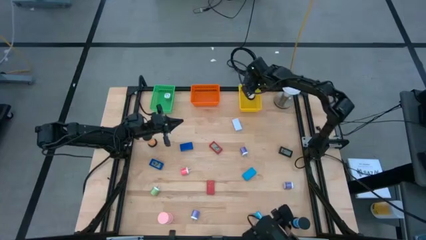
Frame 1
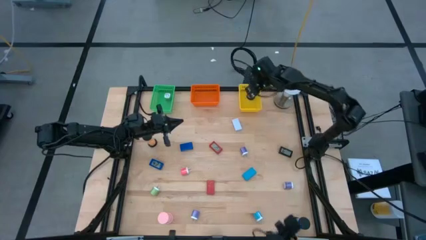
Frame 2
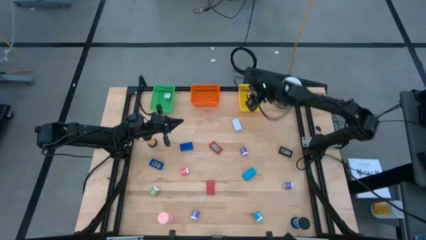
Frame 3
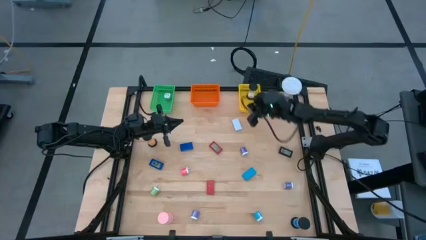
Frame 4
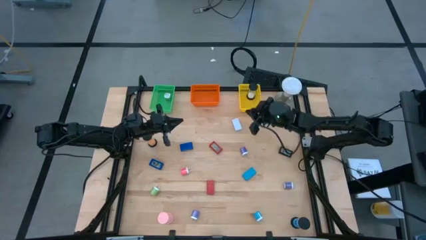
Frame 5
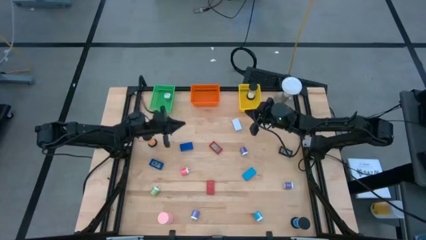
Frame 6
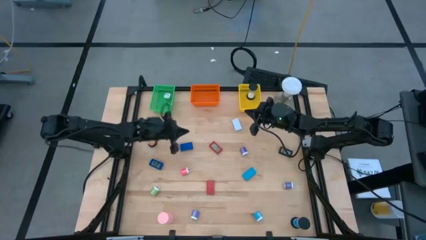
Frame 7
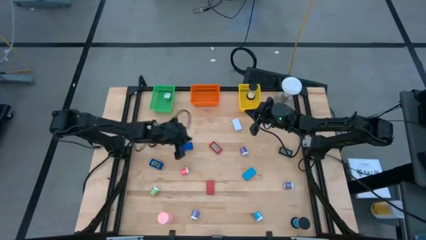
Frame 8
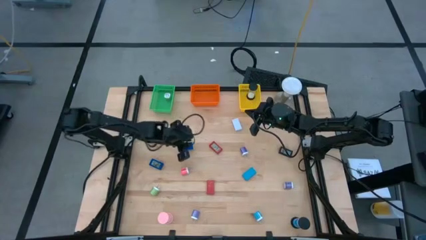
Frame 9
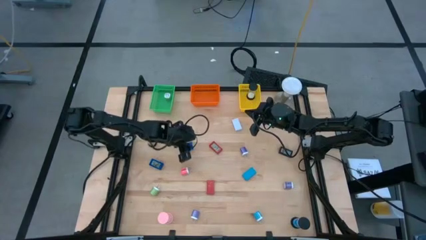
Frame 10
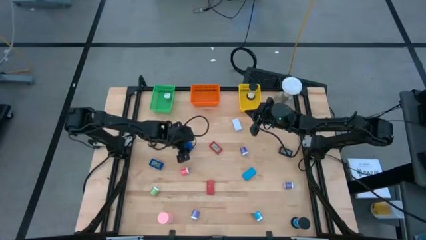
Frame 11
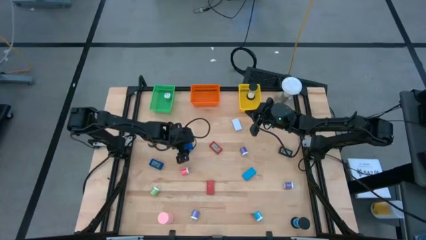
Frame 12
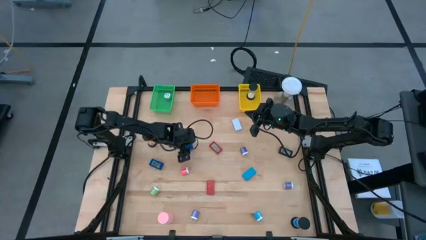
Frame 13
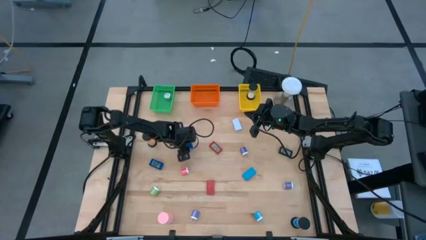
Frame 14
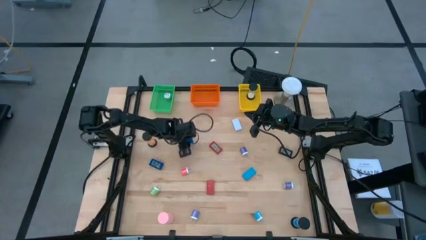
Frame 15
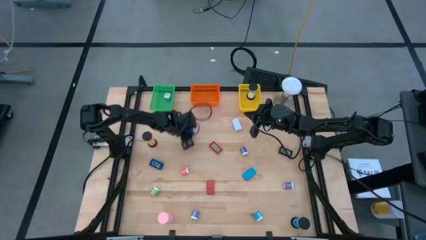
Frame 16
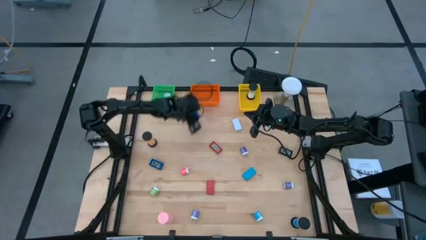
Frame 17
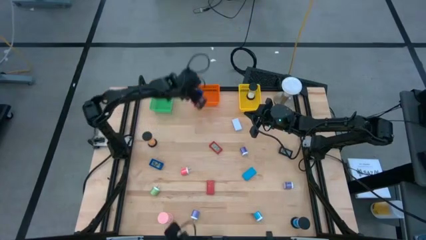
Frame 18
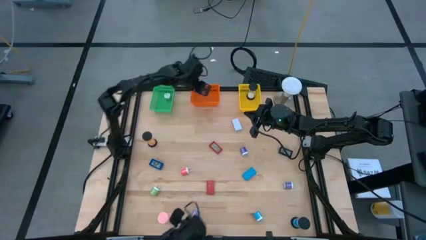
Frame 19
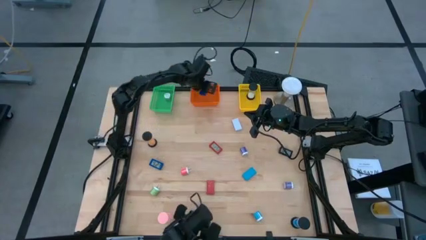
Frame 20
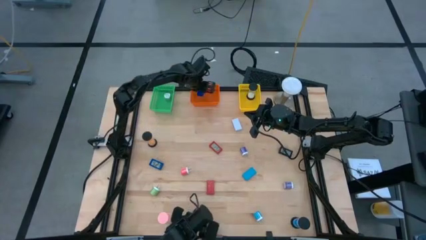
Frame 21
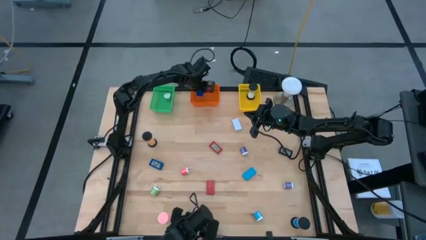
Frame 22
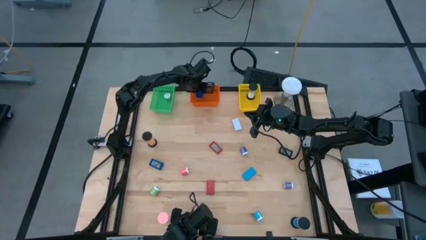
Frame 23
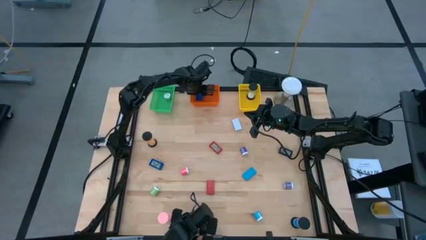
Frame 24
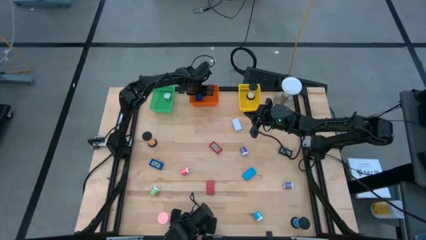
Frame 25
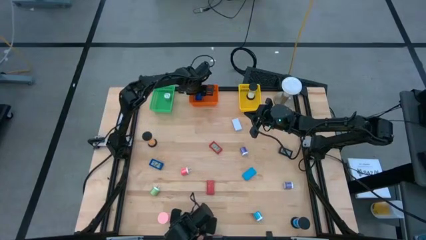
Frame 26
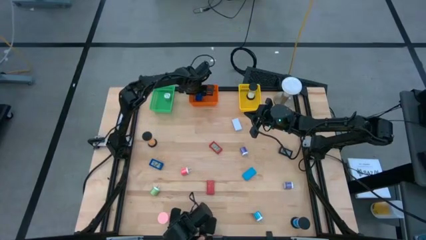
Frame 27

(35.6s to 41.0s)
Task: Pick & Place Office items
Put the right blue digital clock into the orange bin

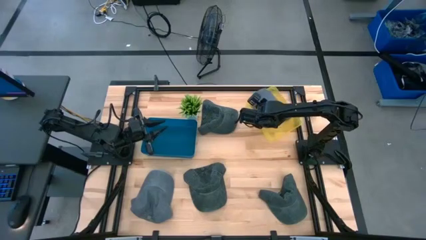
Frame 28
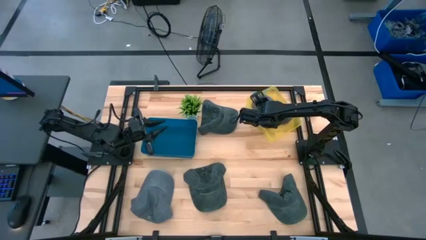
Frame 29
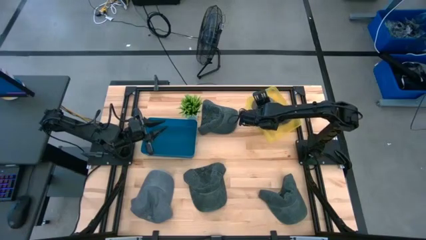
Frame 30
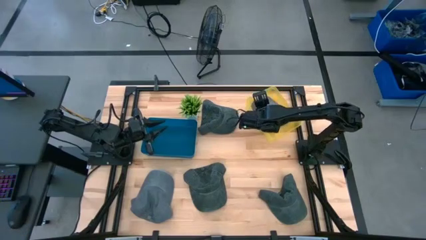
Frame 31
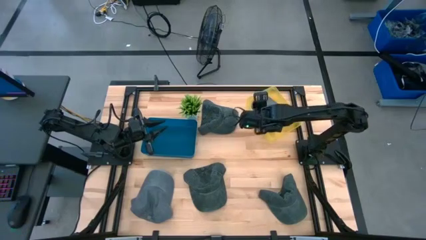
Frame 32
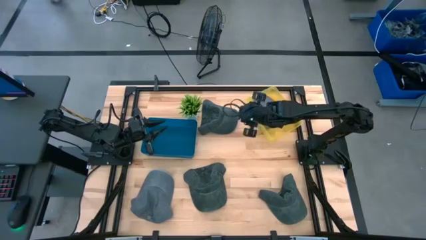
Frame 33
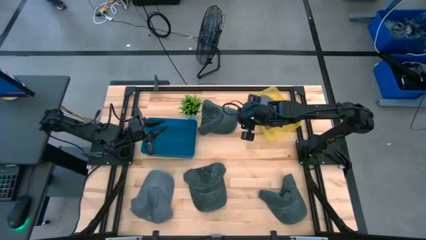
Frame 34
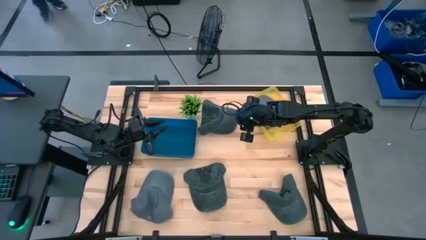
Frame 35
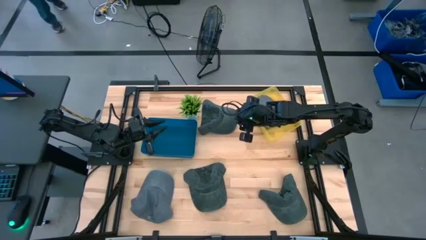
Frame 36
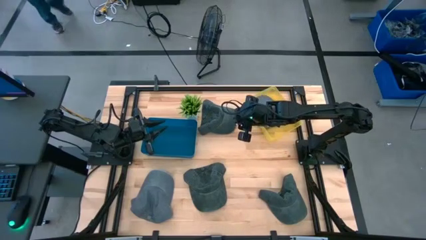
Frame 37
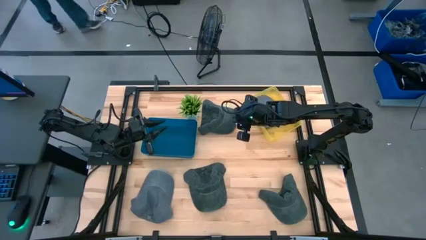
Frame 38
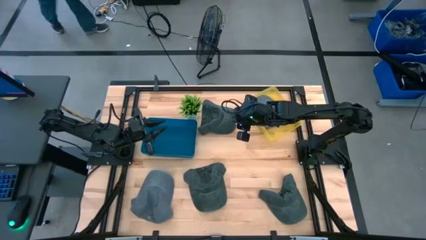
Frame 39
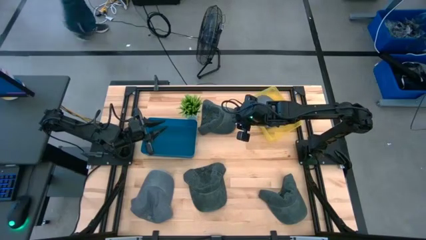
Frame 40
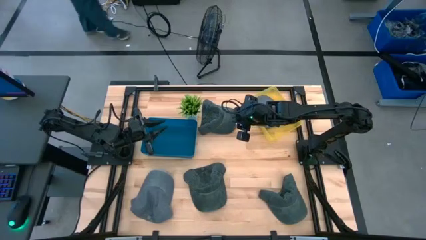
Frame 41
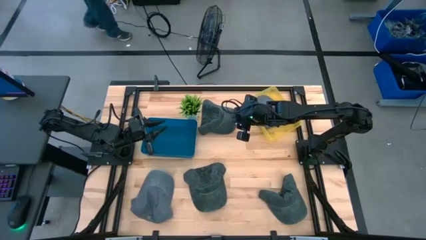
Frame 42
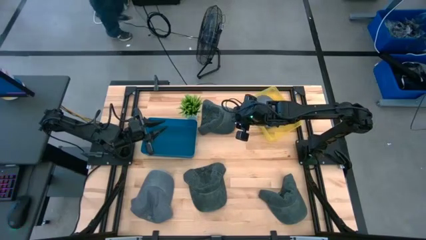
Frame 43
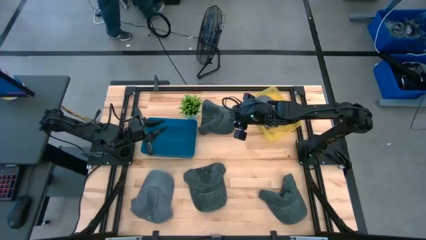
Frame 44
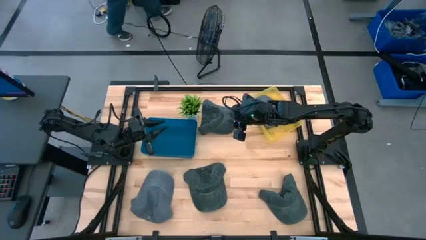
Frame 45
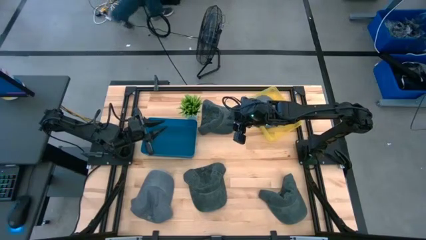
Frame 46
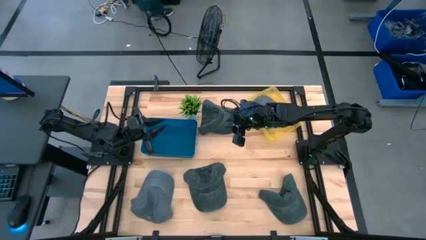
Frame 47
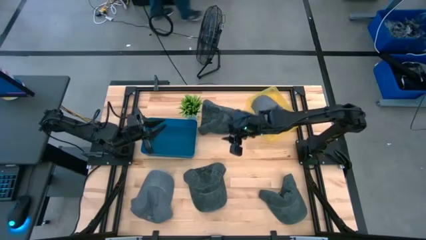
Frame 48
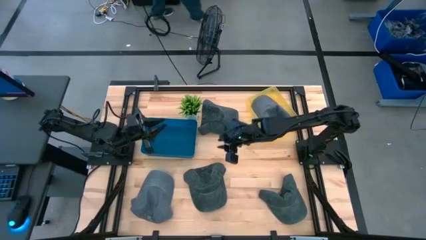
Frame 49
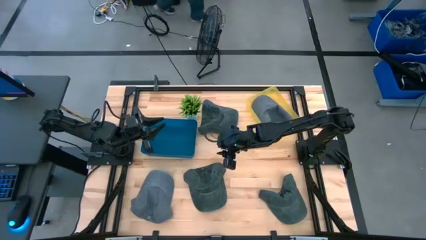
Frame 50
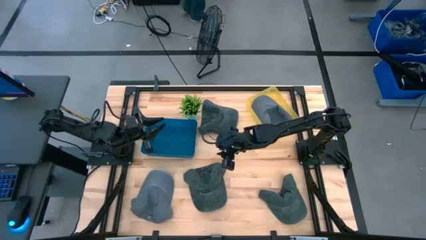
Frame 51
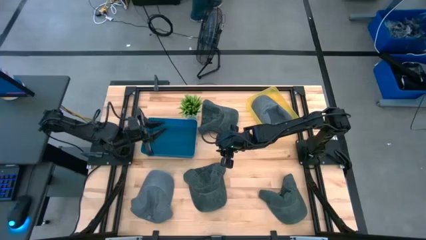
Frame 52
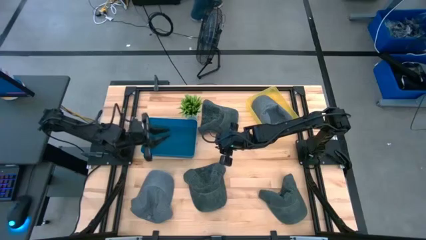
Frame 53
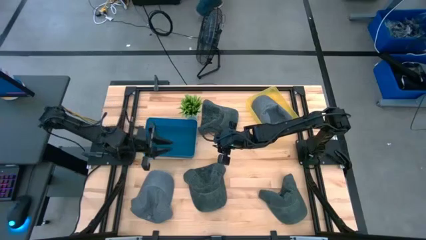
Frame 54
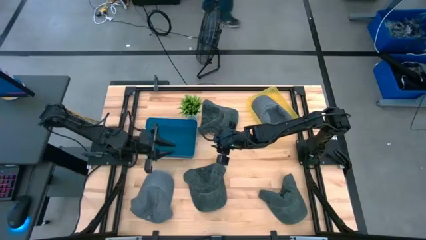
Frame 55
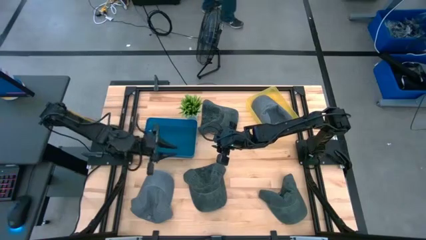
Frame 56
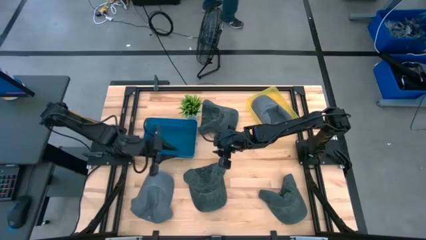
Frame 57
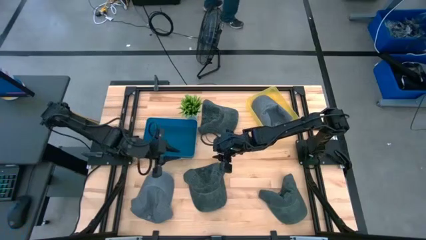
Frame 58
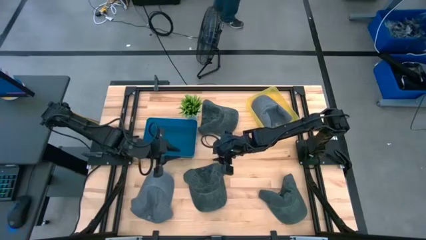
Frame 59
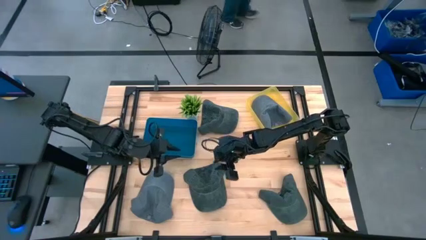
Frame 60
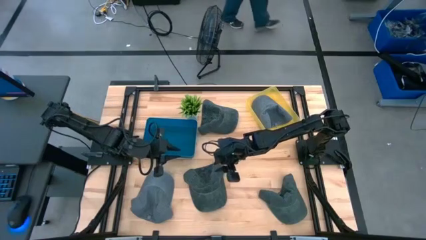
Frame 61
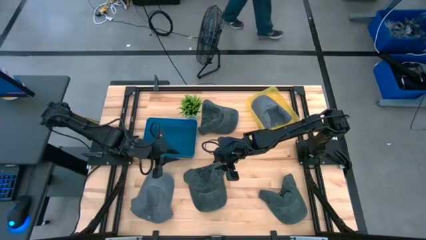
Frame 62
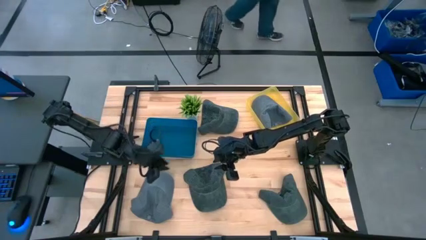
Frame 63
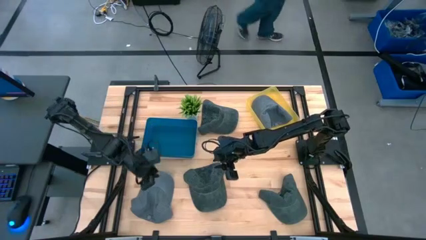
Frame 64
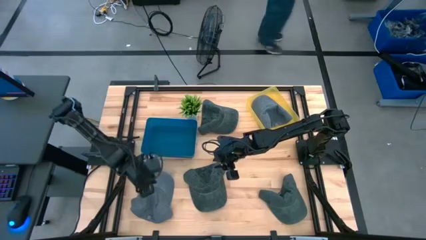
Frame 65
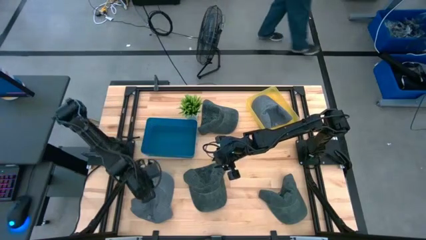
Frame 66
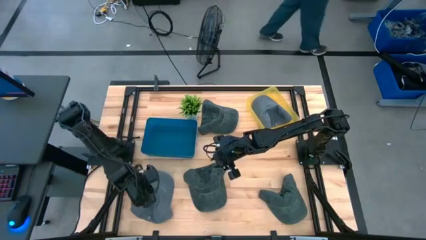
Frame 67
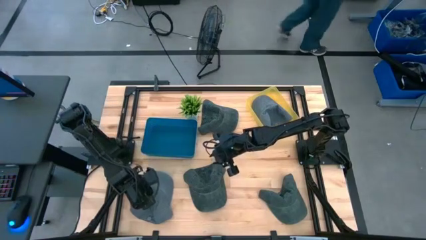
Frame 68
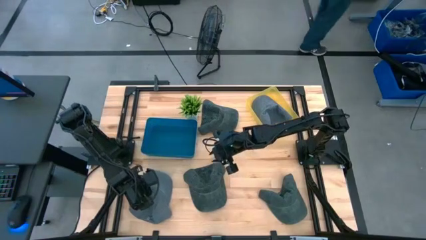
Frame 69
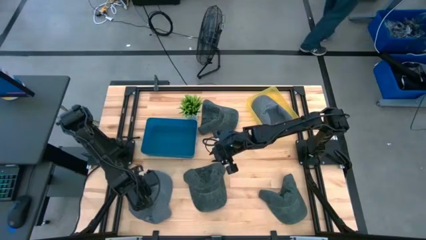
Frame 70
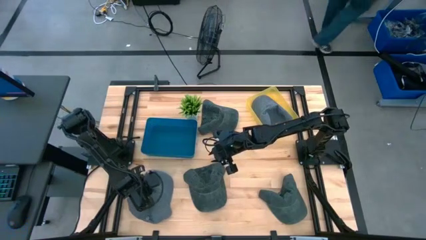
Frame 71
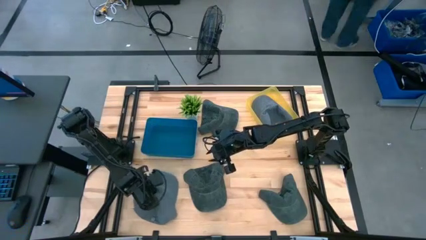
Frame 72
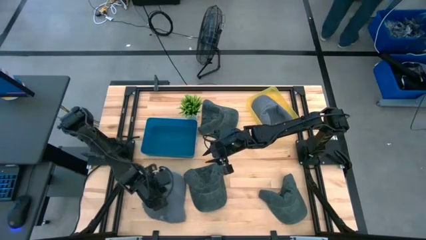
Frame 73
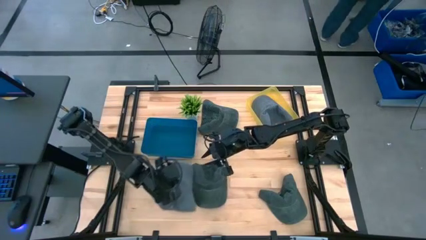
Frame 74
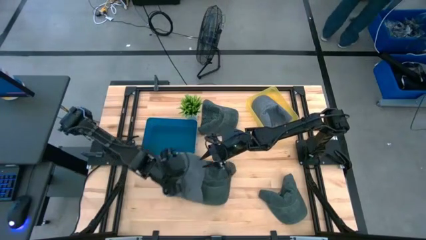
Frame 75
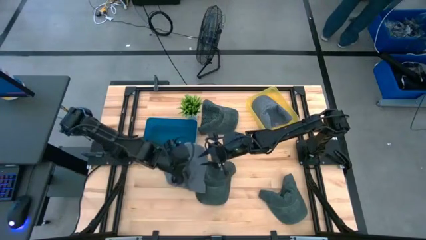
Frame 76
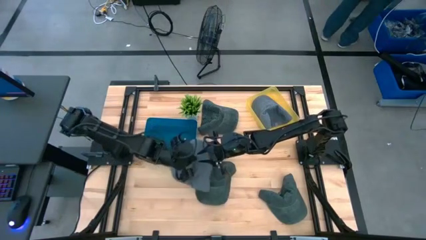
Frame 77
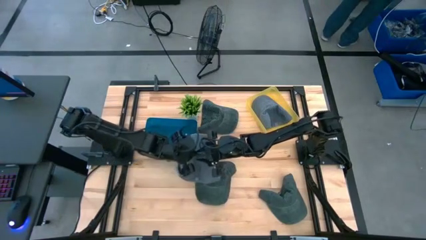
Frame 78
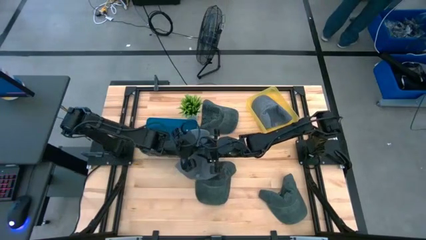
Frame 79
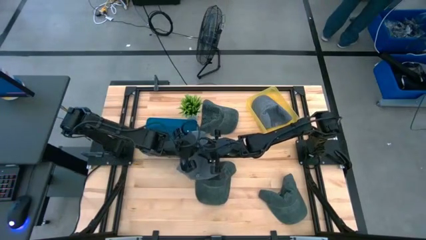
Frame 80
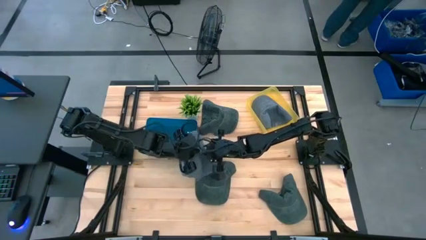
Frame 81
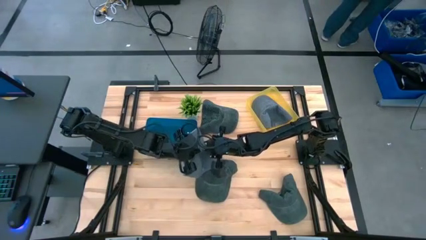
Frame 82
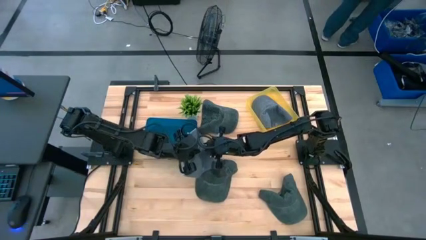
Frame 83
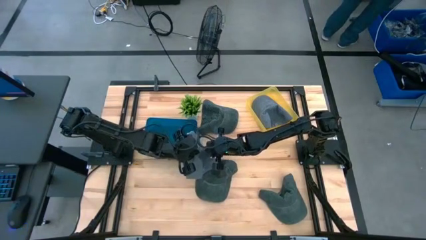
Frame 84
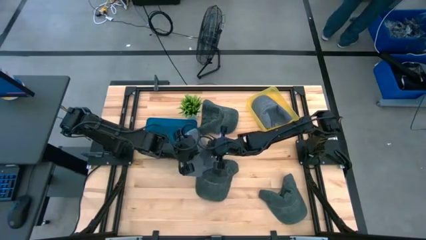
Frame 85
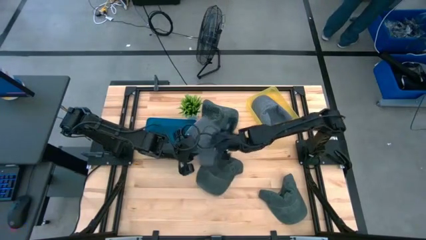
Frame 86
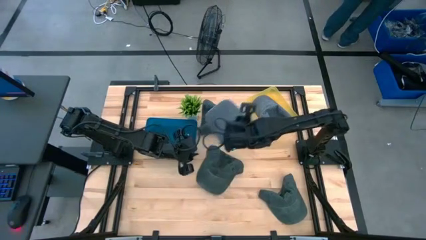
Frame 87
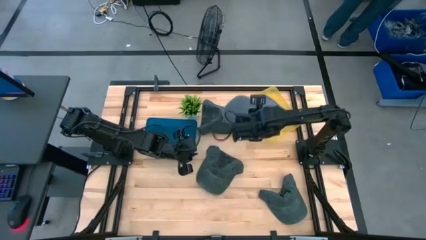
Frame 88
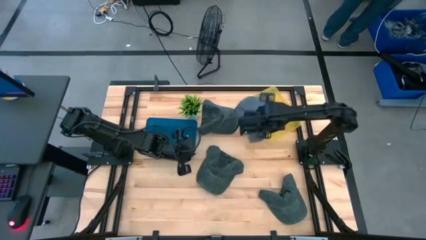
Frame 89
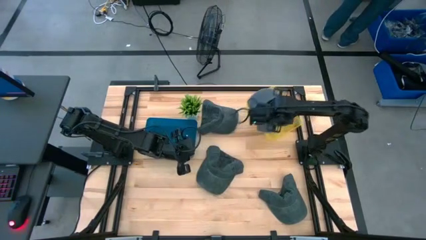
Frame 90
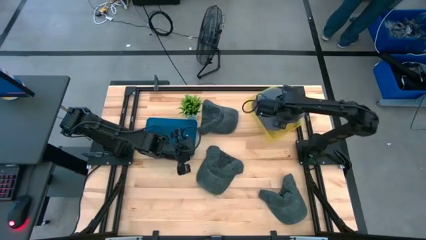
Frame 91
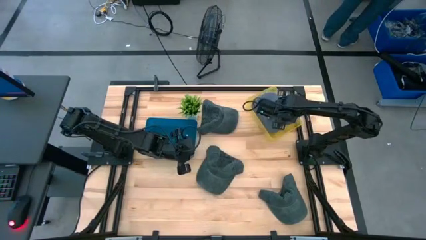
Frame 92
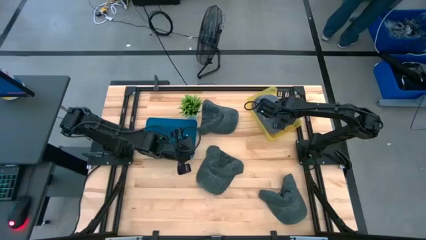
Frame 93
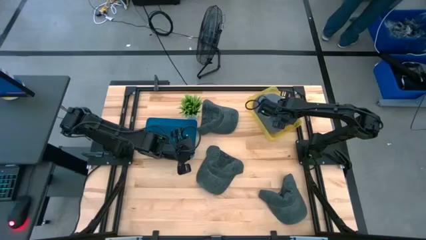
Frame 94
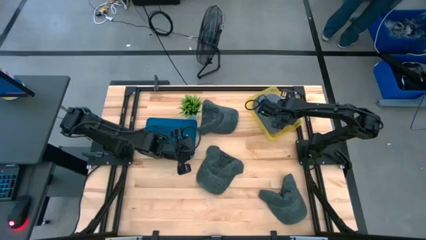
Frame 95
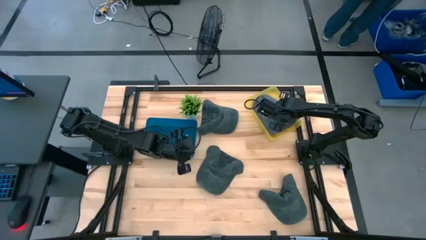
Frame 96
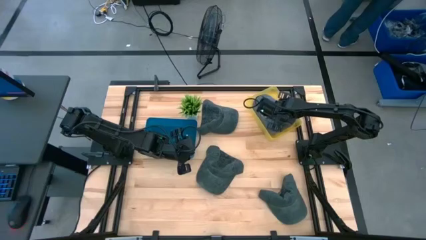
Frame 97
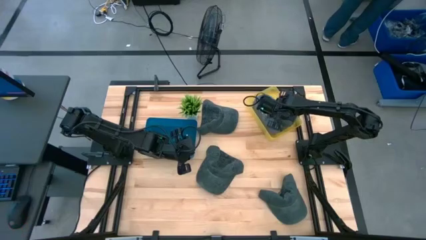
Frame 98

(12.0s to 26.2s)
Task: Pick & Place hat
Put the gray cap into the yellow bin
